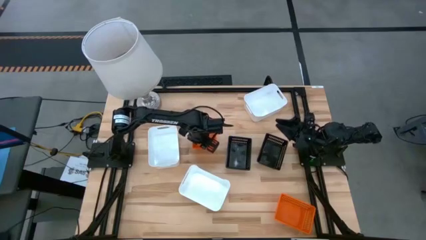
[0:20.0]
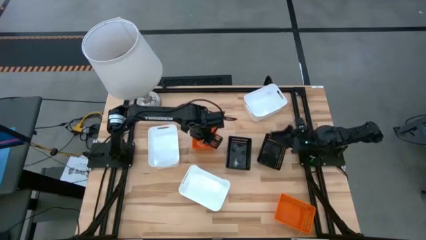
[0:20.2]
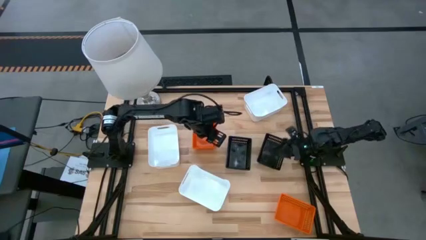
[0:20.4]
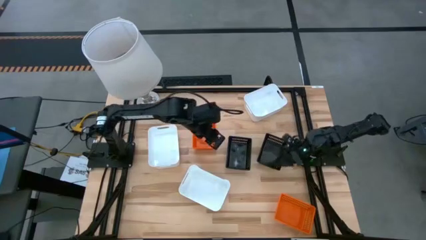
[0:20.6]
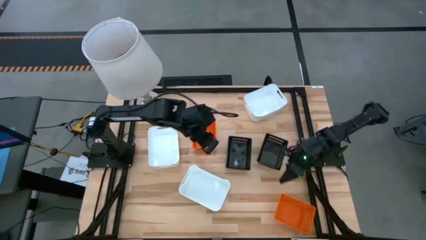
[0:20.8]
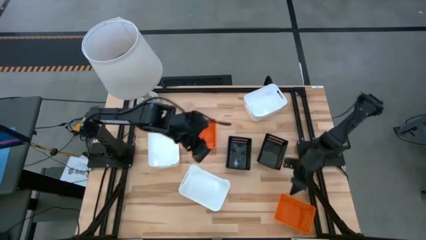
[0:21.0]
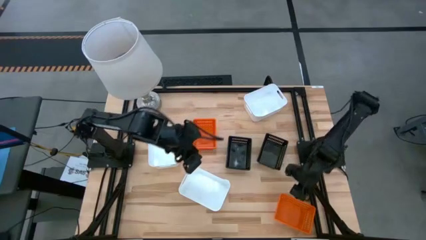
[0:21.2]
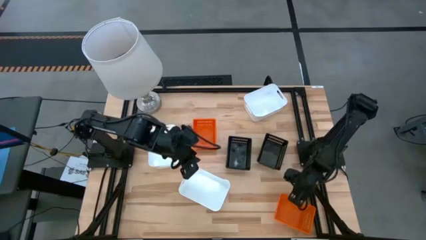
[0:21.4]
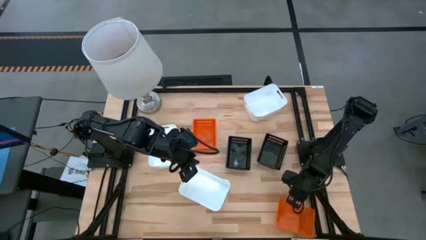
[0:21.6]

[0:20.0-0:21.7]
Stack the bottom orange bin on top of the top orange bin

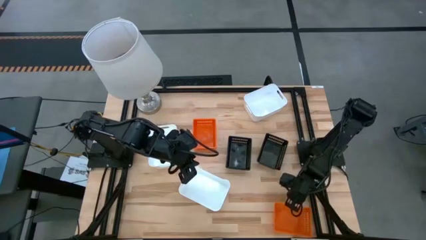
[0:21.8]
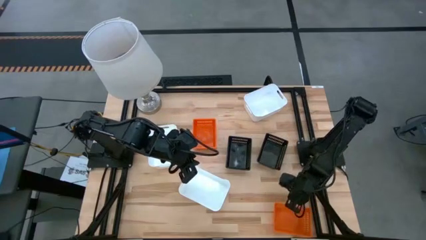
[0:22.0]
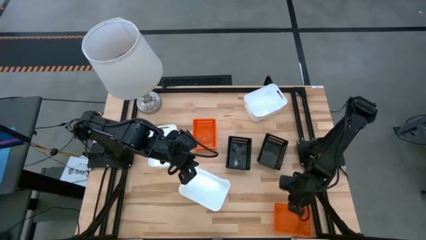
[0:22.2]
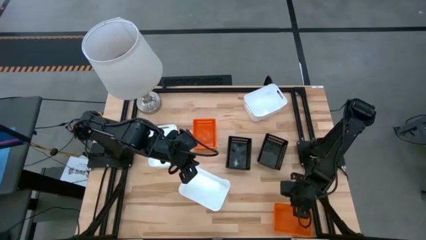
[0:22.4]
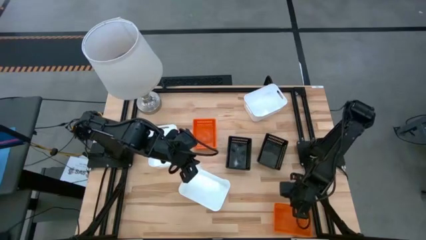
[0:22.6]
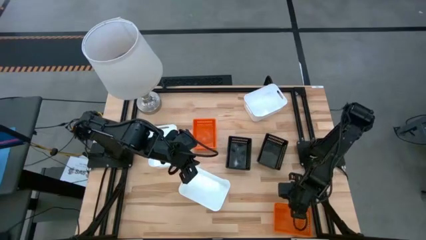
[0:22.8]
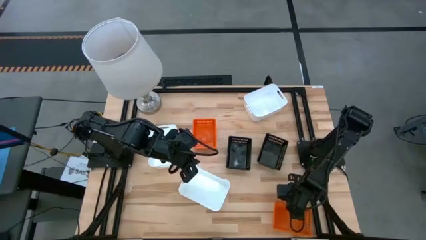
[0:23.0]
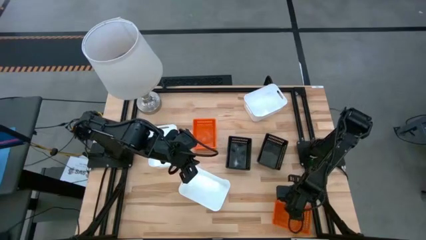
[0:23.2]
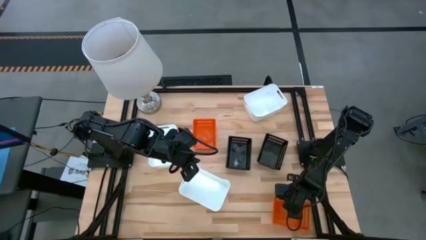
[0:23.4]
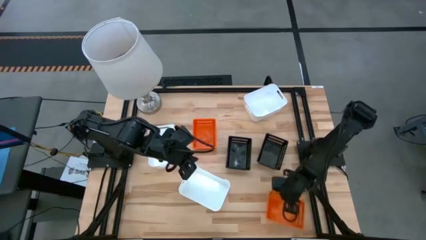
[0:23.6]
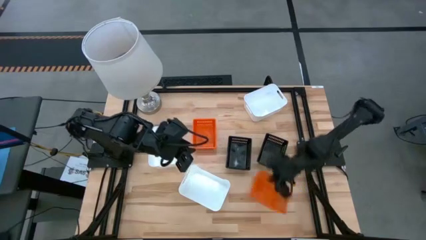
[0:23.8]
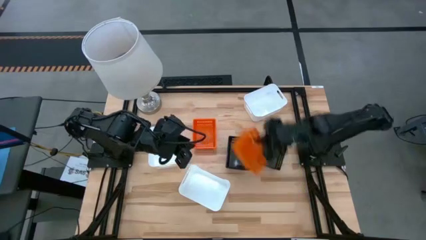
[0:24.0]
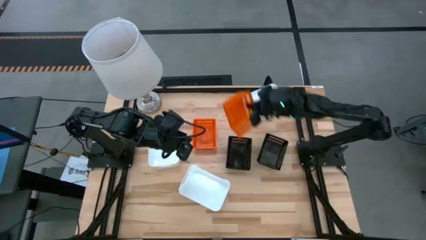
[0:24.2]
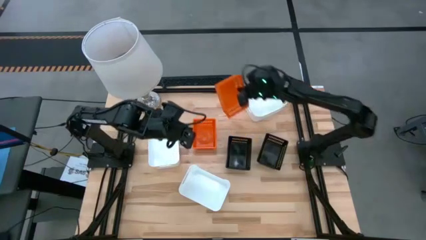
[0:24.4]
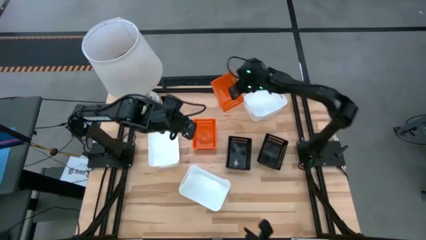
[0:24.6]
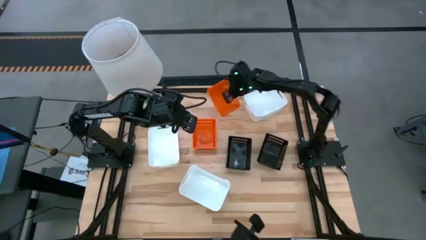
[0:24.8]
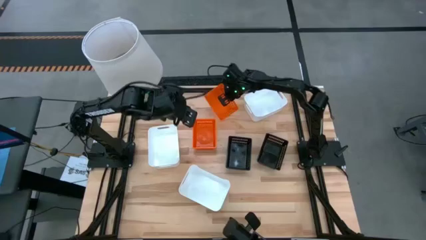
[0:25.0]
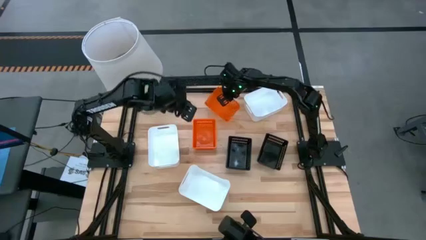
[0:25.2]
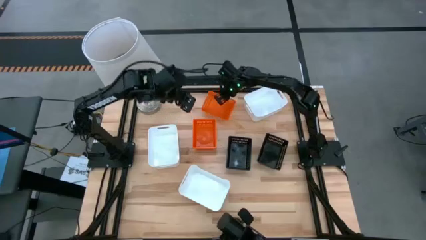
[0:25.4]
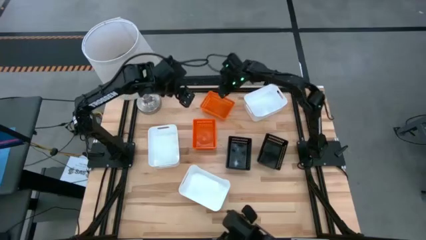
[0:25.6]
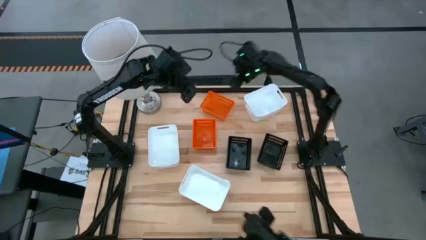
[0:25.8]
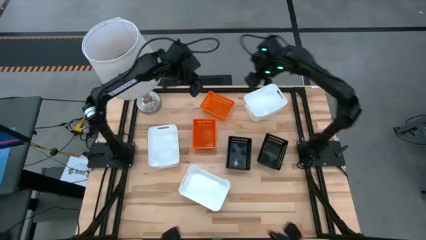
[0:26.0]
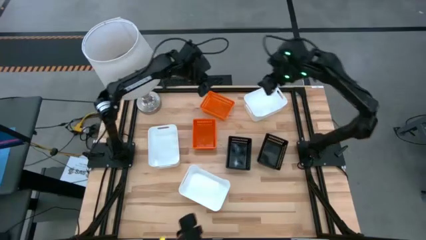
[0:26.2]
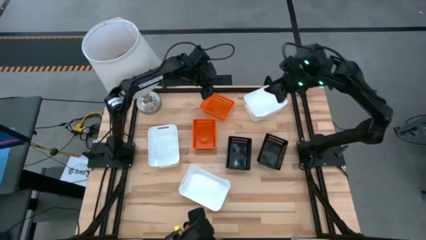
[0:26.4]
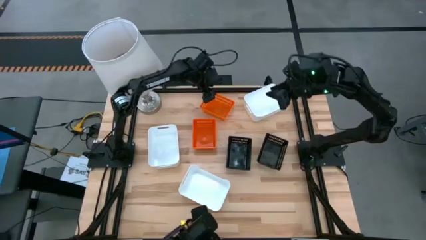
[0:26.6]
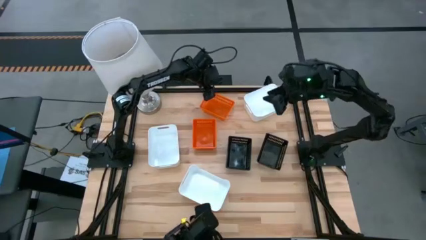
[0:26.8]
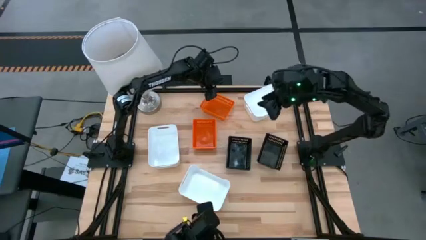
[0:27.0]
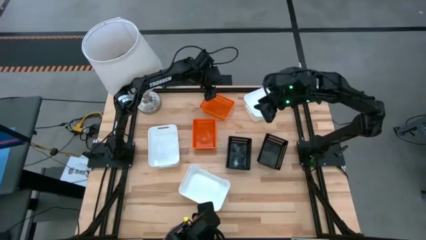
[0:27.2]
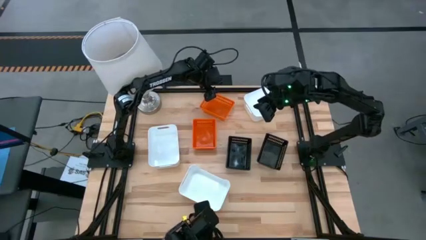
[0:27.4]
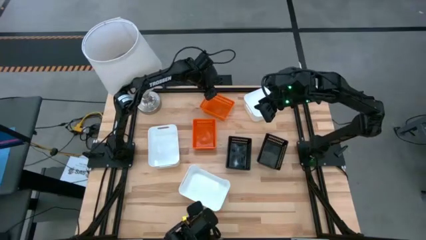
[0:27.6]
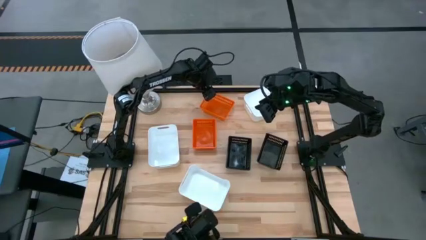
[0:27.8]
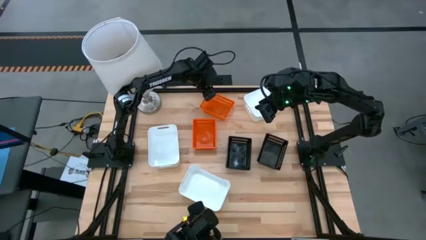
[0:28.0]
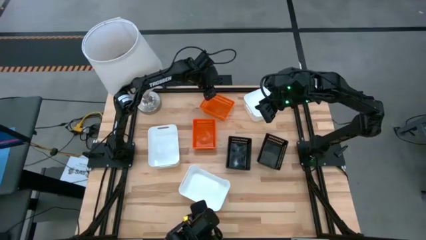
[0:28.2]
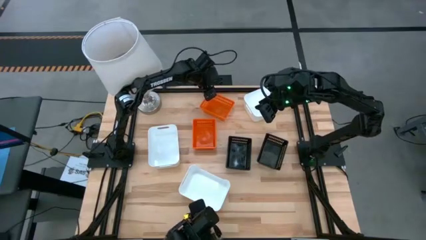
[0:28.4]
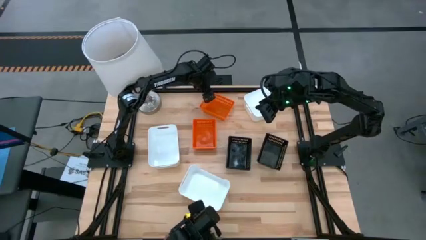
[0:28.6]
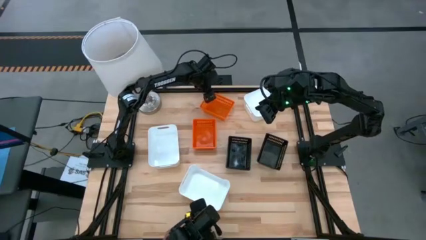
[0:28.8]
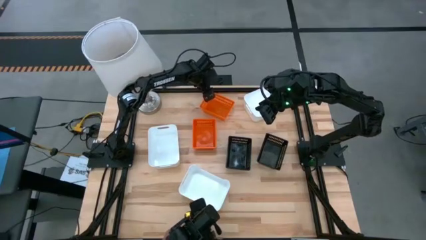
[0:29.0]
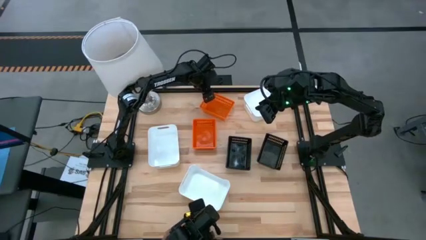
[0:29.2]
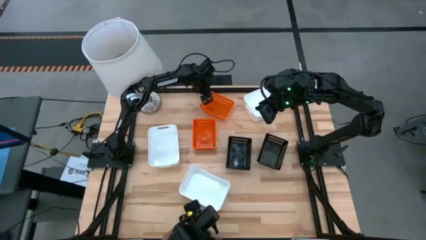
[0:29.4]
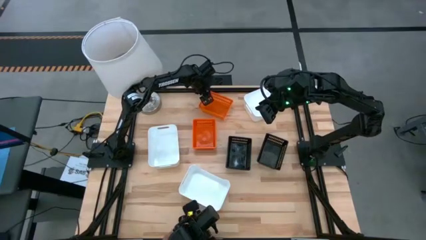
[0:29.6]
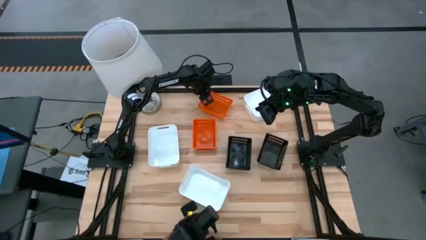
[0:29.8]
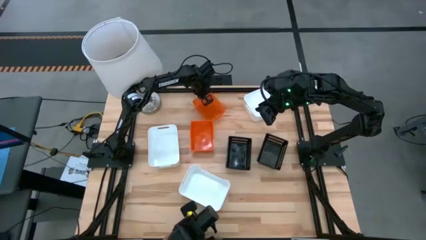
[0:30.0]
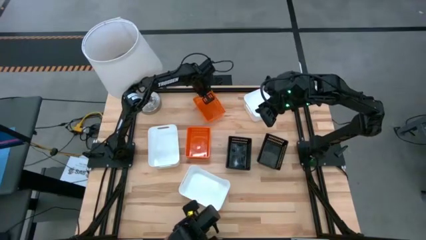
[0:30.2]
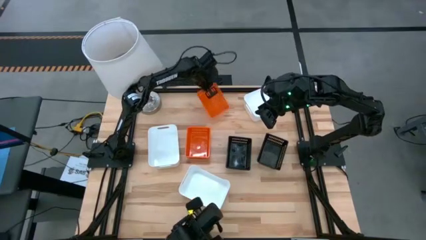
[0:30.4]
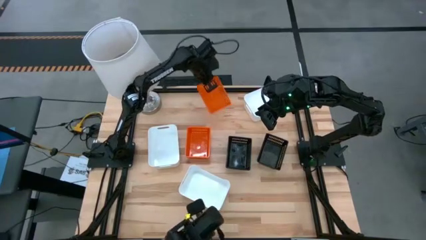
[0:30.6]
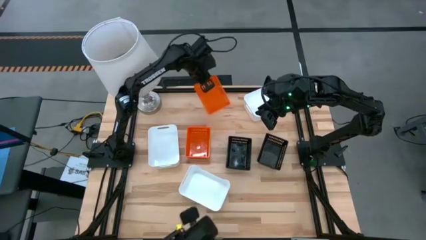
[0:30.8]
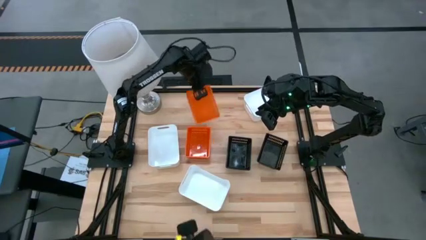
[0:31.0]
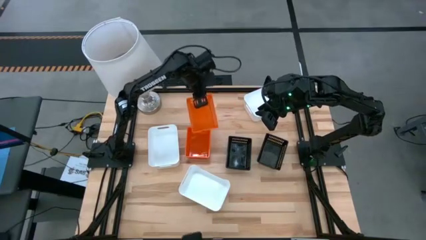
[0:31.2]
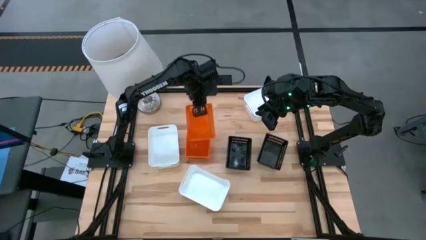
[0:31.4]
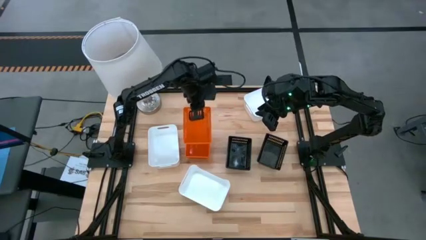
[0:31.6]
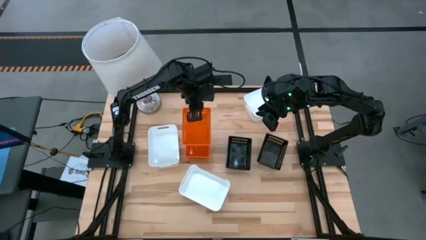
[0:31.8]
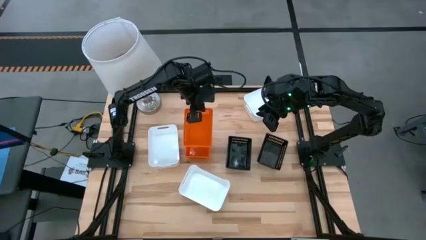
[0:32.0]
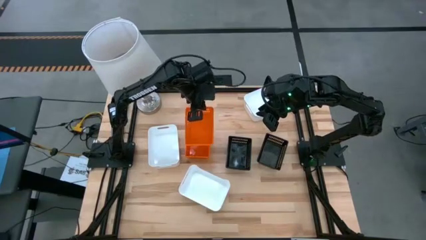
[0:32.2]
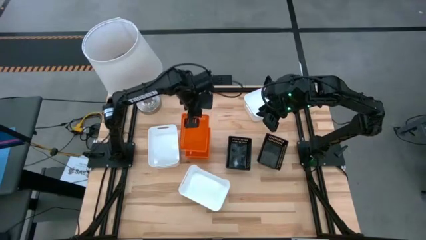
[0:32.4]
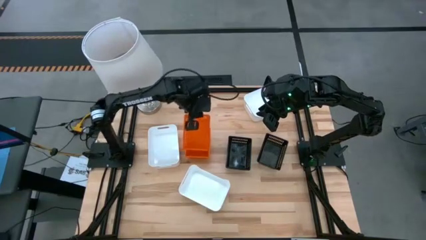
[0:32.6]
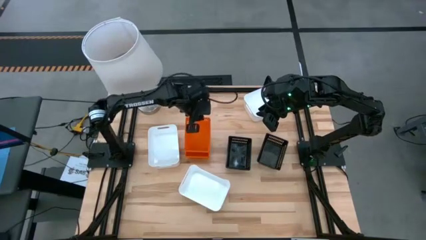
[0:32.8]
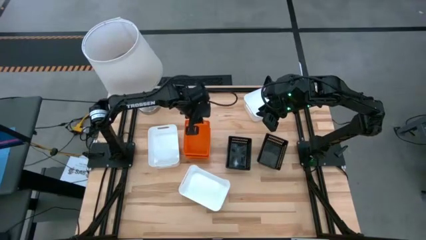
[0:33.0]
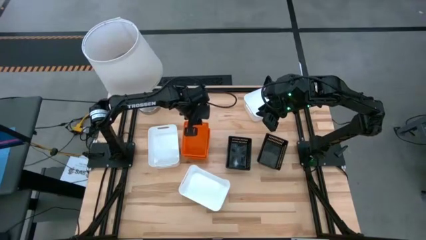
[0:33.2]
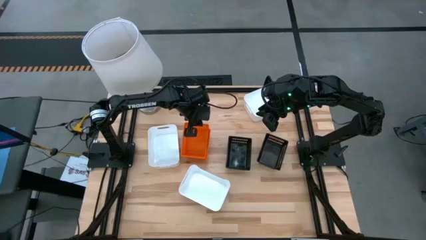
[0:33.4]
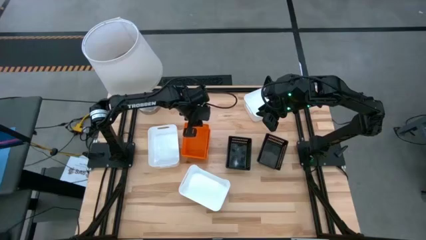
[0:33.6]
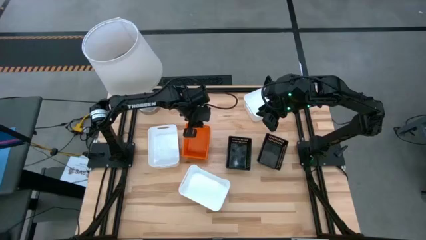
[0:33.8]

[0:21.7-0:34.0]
Stack the bottom orange bin on top of the top orange bin
